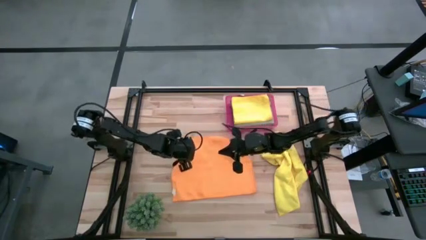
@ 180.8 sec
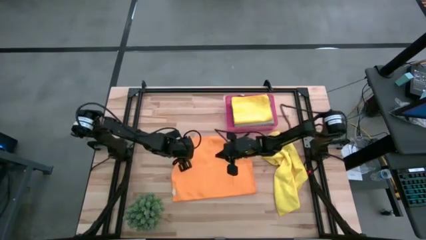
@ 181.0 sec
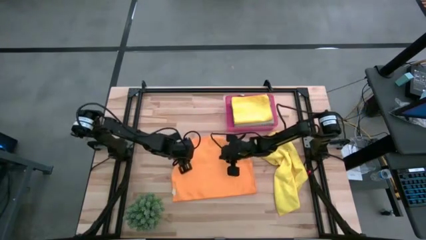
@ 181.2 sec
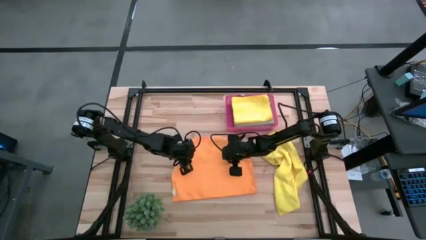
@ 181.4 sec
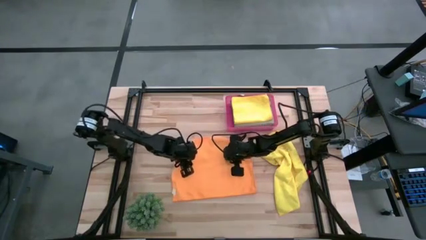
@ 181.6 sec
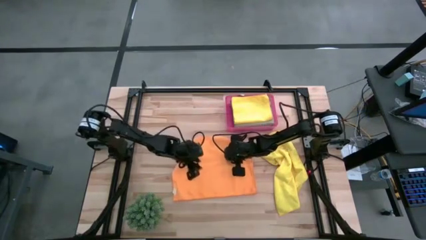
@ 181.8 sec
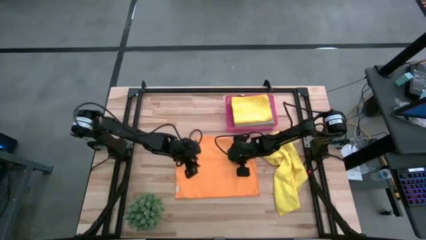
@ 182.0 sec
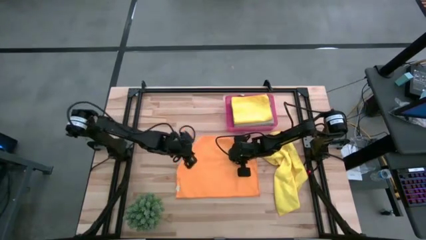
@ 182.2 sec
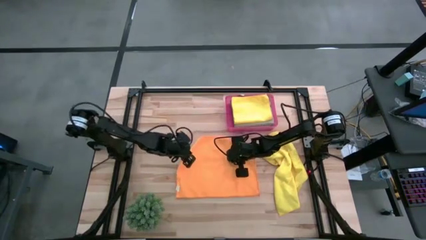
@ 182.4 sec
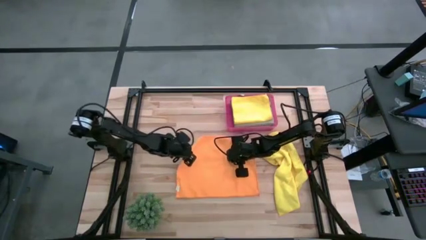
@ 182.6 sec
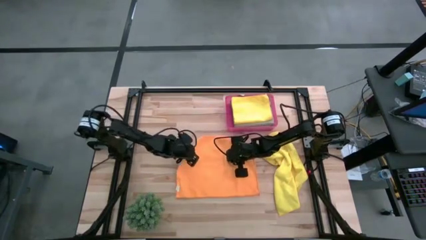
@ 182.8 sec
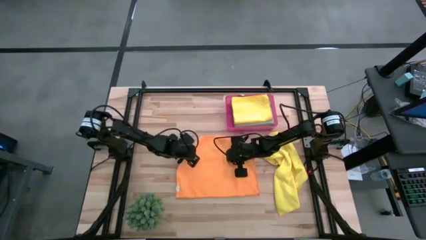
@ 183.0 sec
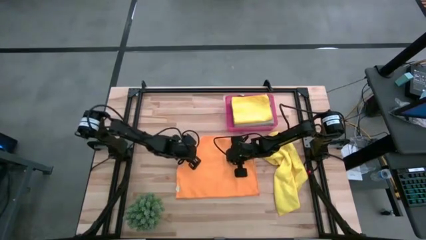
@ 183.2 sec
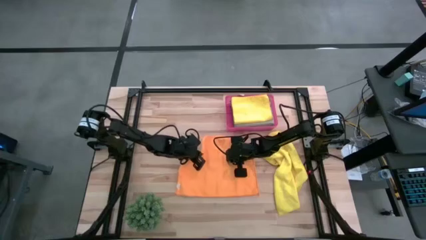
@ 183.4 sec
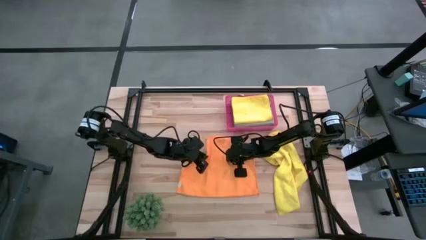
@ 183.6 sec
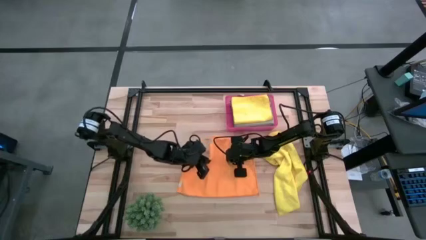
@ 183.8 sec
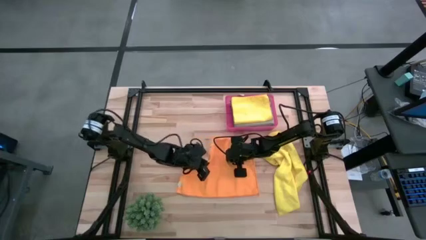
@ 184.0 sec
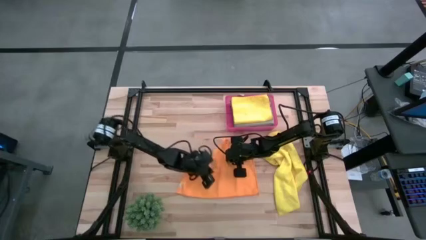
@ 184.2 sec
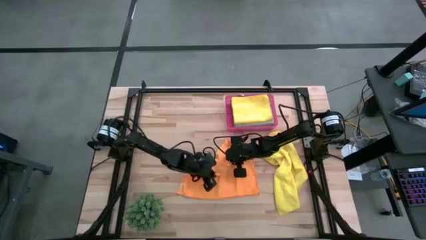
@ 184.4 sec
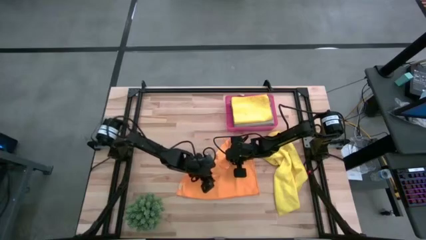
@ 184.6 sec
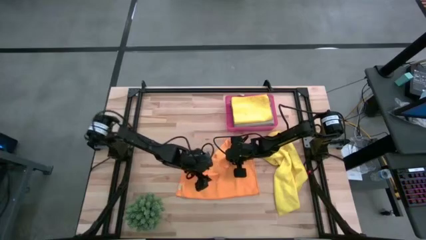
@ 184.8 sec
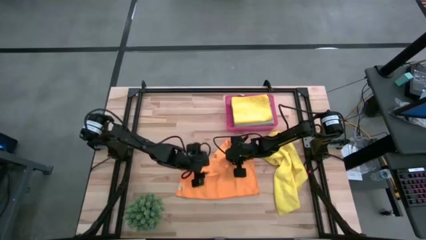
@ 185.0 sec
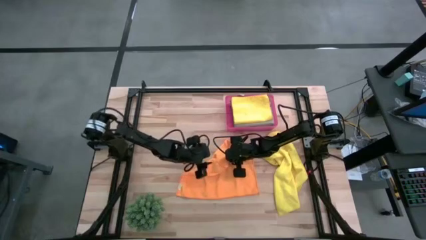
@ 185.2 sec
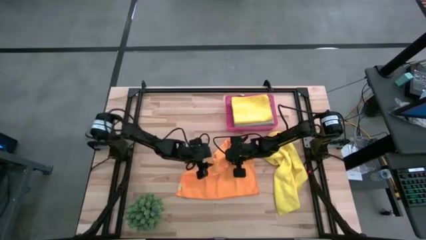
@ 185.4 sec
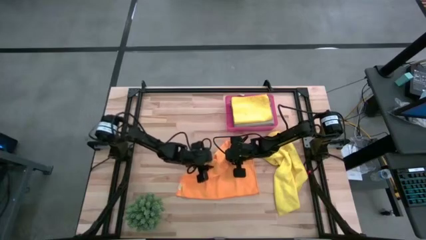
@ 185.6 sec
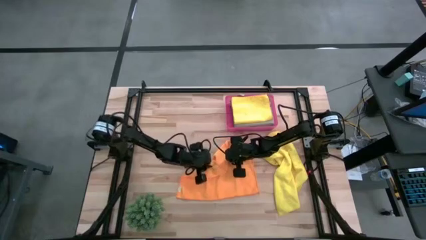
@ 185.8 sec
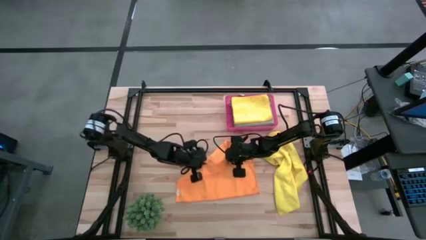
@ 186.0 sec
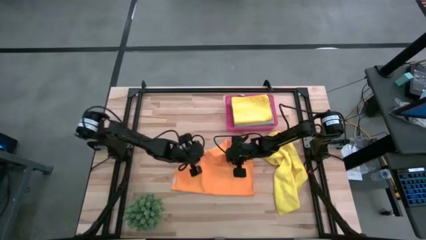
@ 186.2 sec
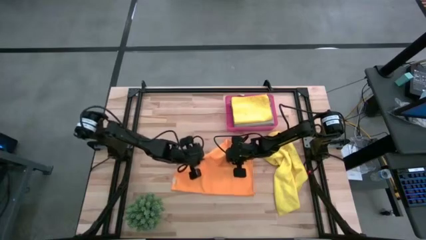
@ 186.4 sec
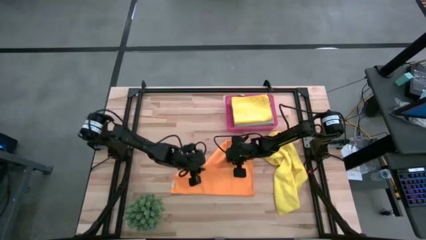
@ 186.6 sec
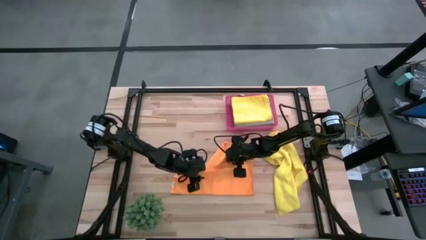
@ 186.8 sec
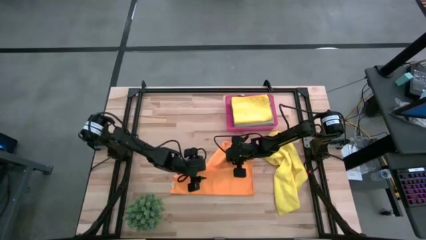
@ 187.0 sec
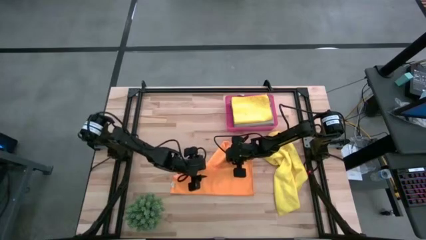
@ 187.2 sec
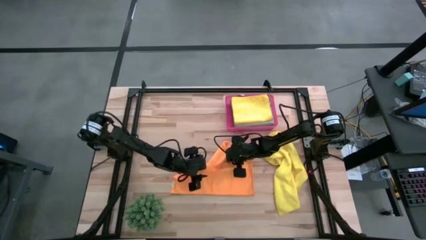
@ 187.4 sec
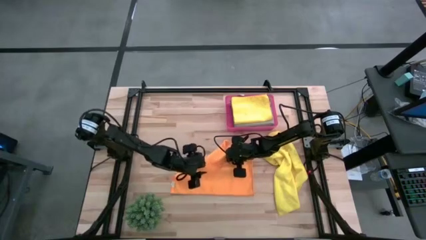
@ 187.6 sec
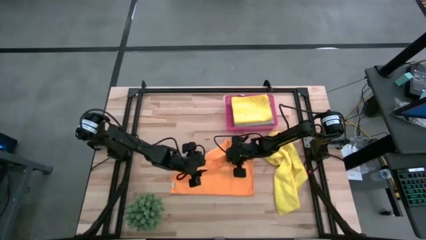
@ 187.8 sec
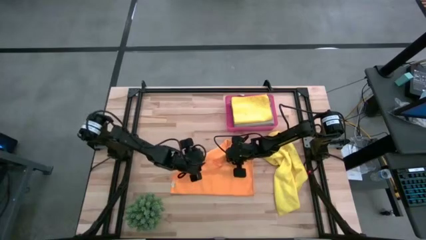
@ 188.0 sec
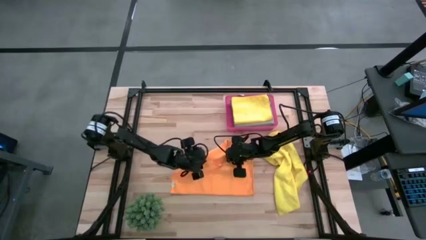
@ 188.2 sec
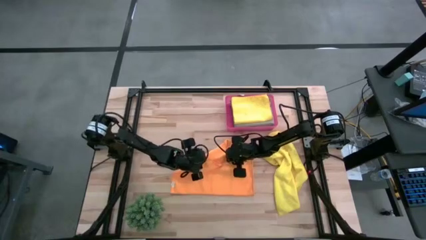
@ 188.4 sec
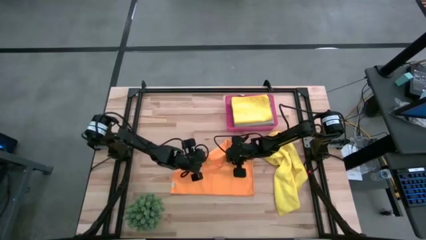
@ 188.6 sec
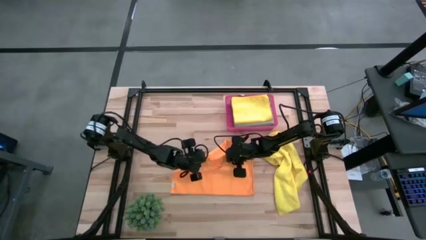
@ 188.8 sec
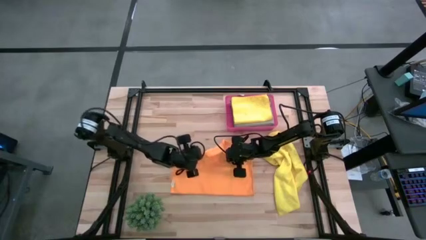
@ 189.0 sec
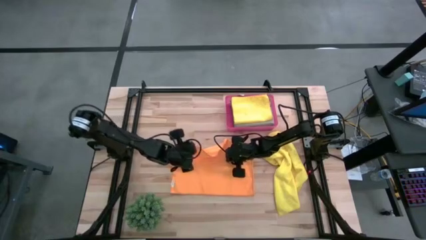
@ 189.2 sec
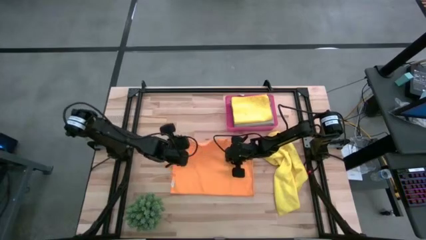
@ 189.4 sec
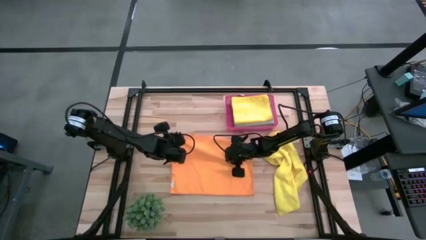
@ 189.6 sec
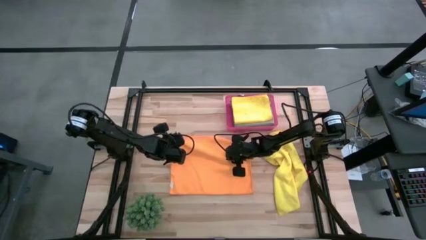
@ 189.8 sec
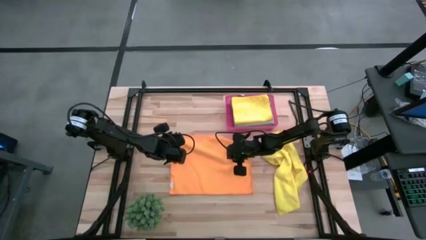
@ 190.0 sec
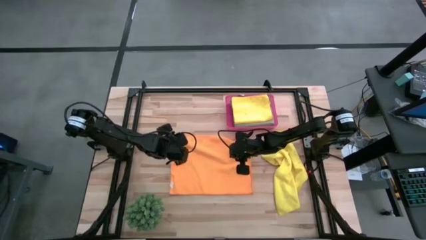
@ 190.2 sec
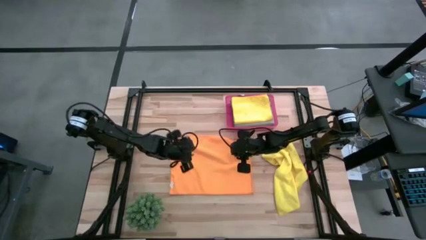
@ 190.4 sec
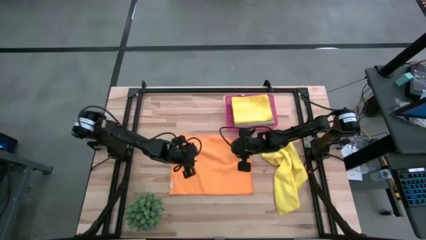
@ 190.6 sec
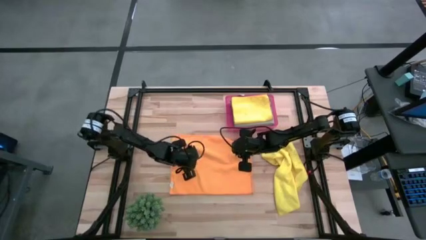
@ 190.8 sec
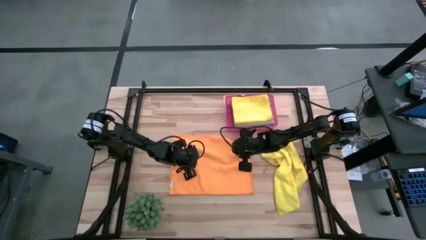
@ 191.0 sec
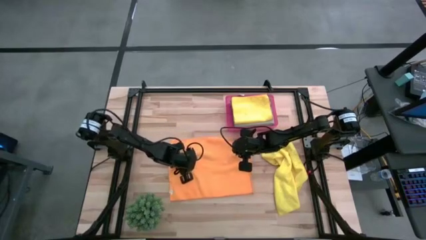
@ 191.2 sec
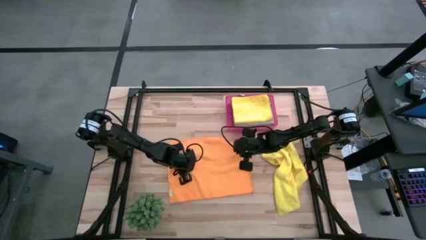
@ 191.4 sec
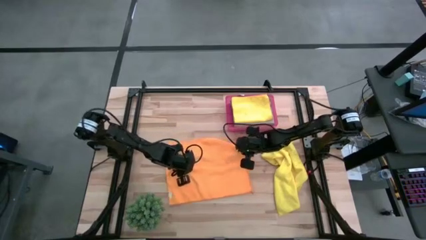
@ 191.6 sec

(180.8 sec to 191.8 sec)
Task: Fold microfiber towels
Fold the orange microfiber cloth

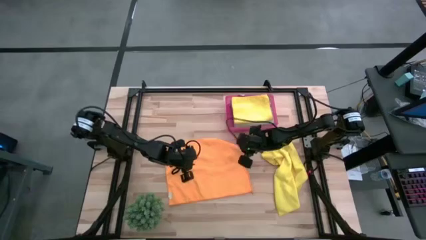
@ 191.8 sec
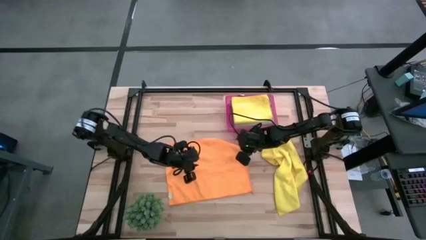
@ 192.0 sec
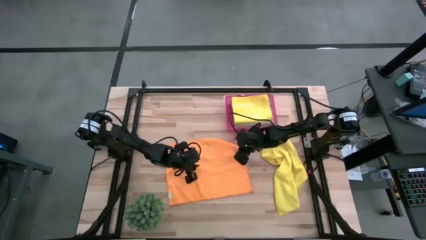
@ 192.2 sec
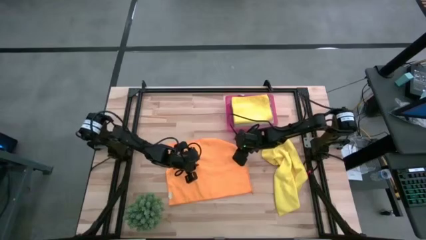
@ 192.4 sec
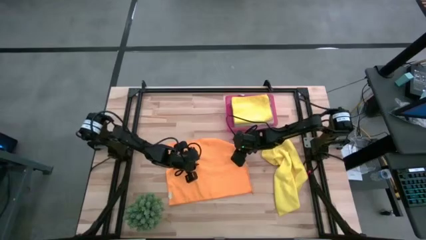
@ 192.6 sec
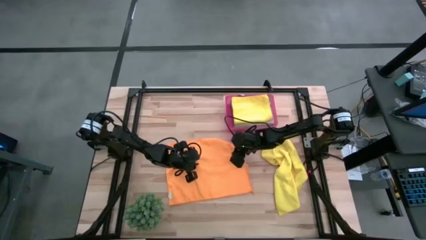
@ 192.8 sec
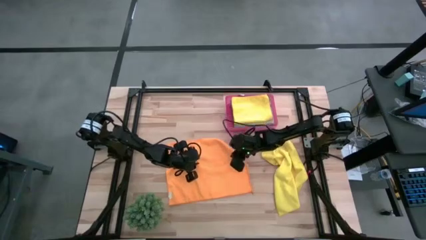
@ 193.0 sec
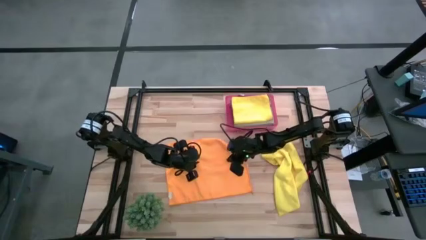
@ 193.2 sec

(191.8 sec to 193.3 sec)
Fold the orange microfiber cloth
